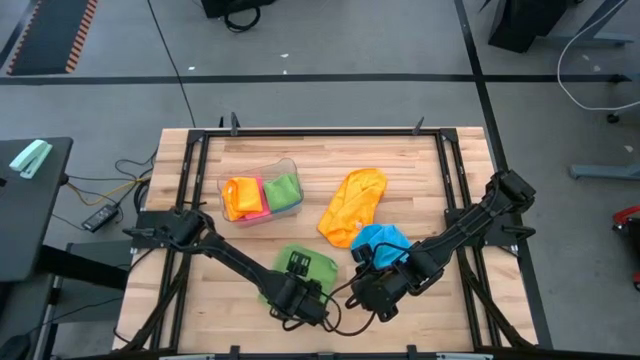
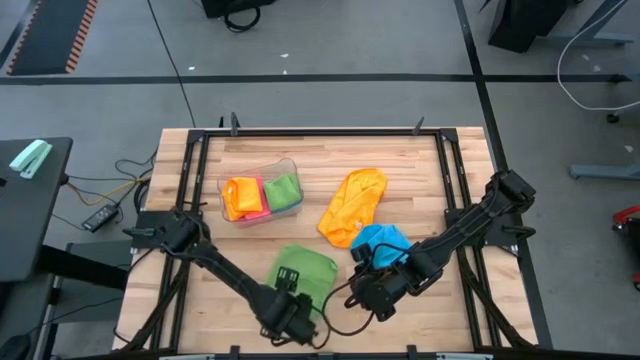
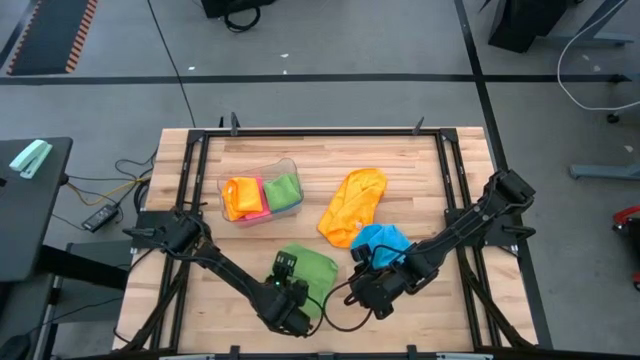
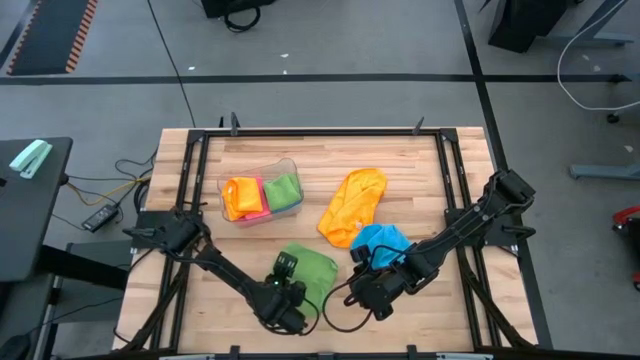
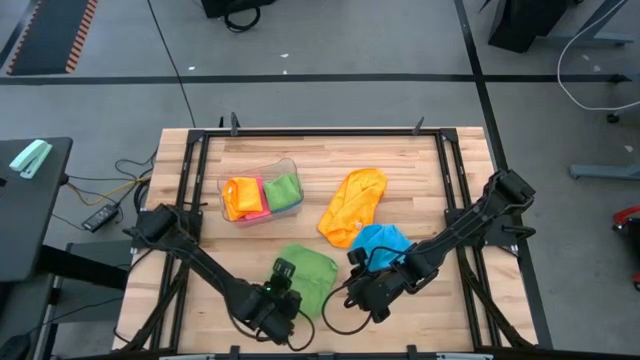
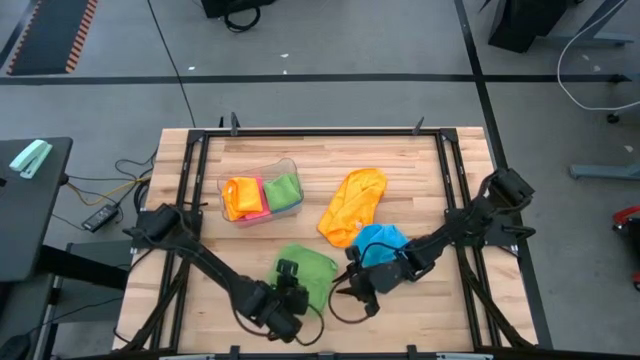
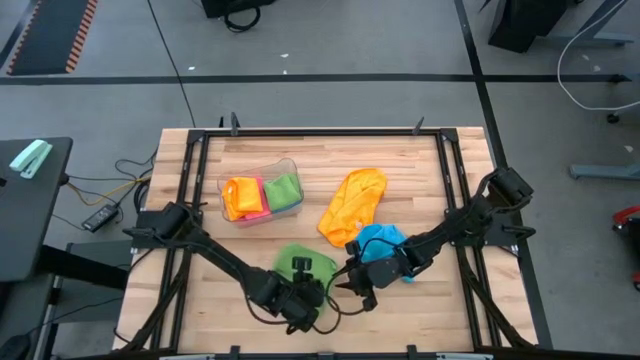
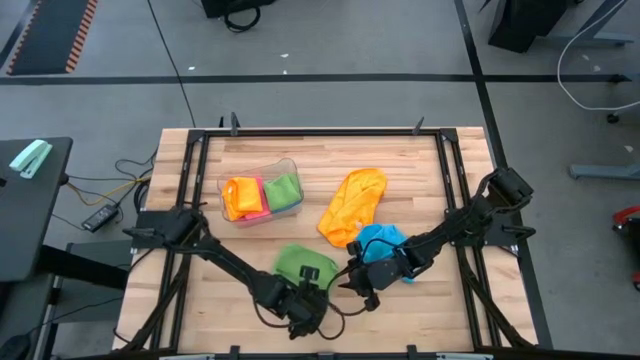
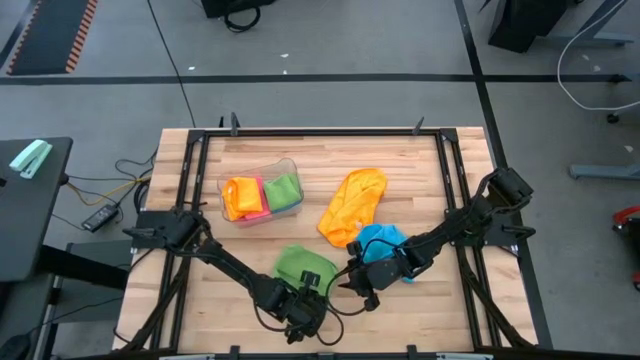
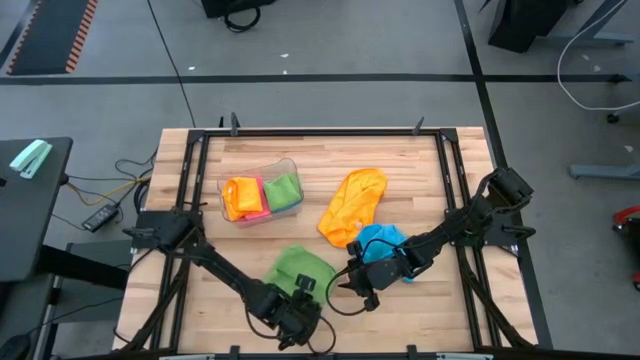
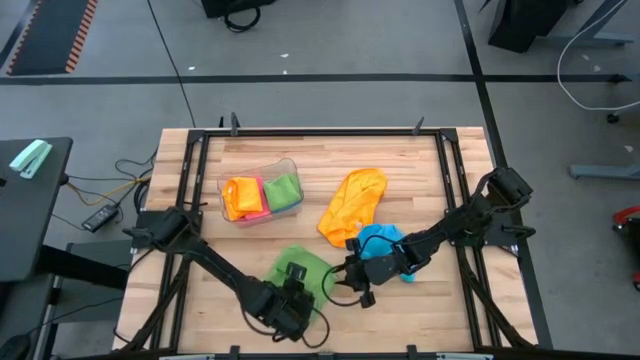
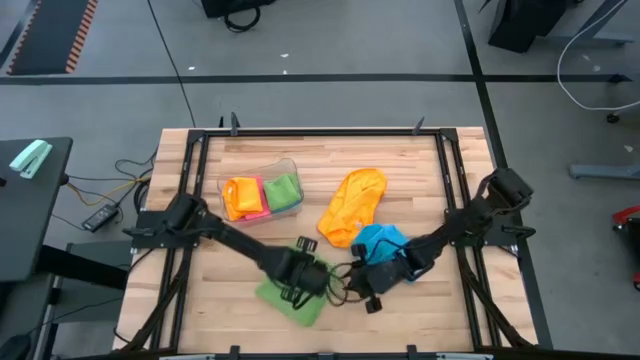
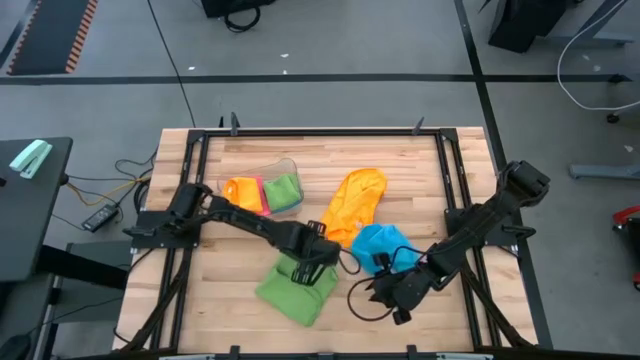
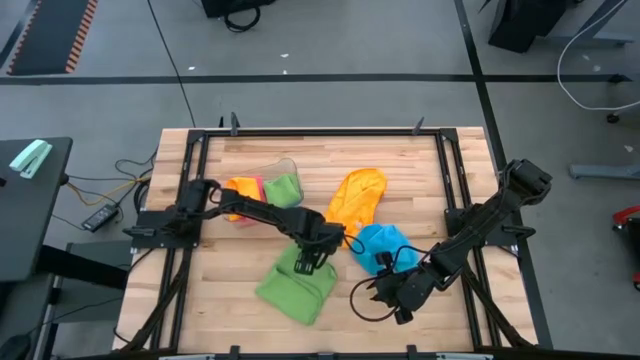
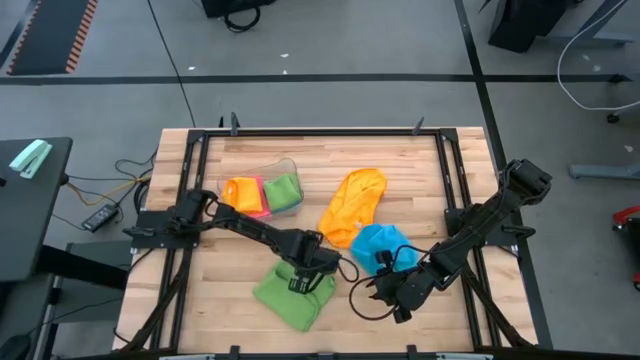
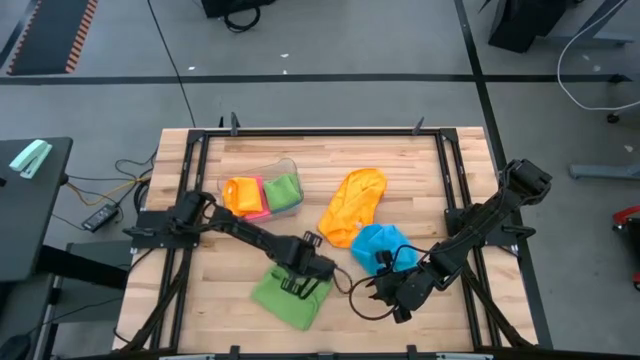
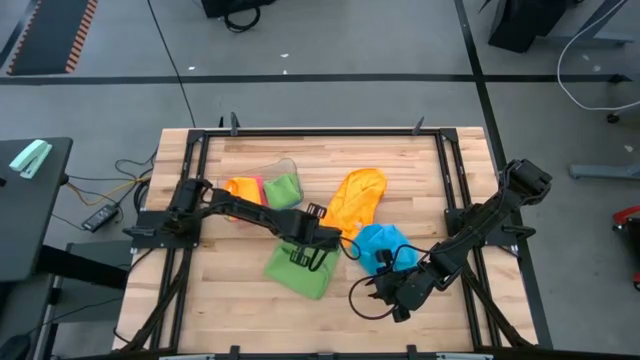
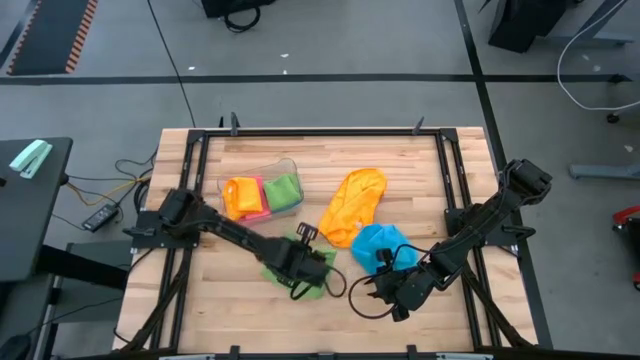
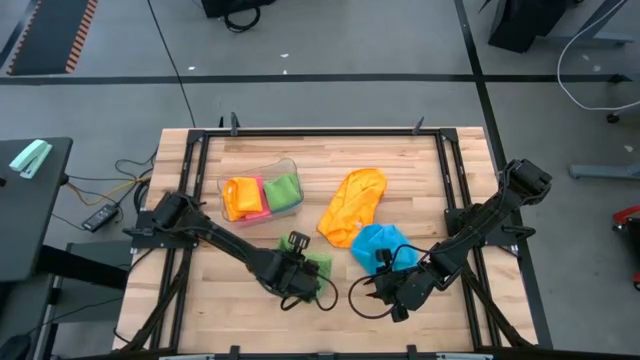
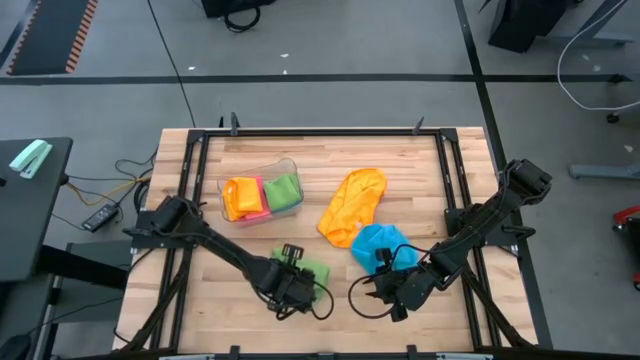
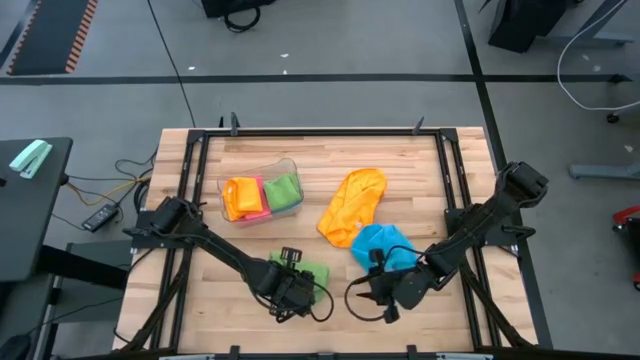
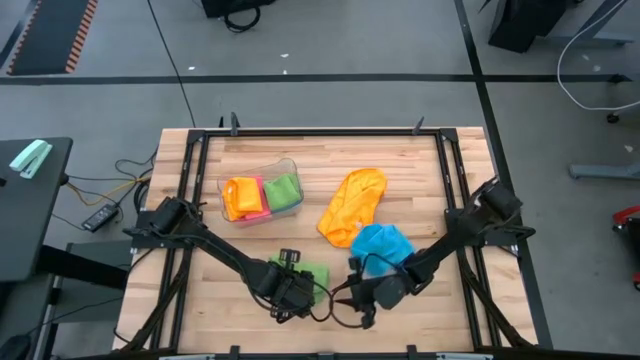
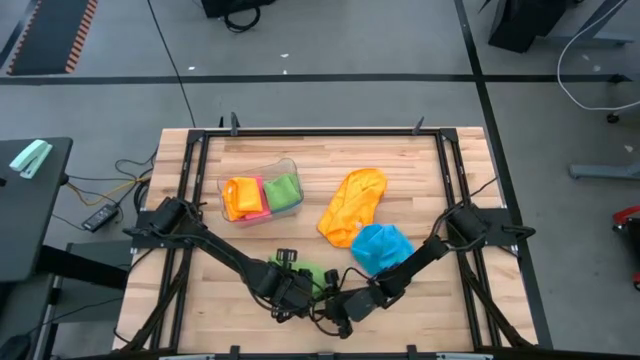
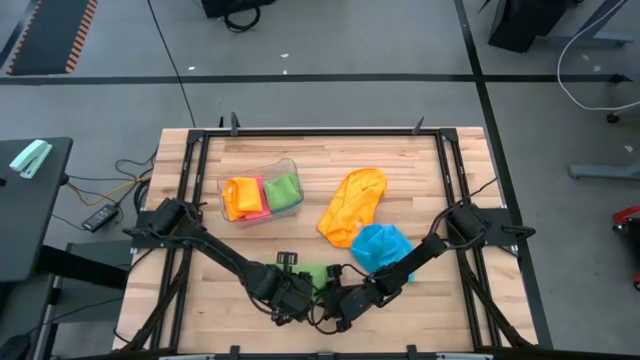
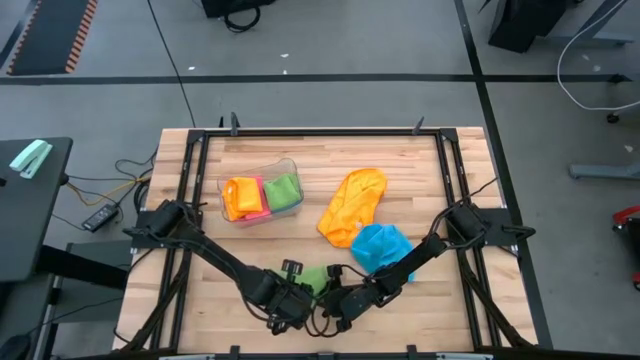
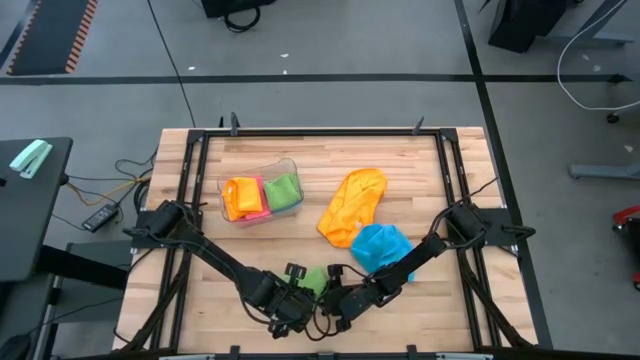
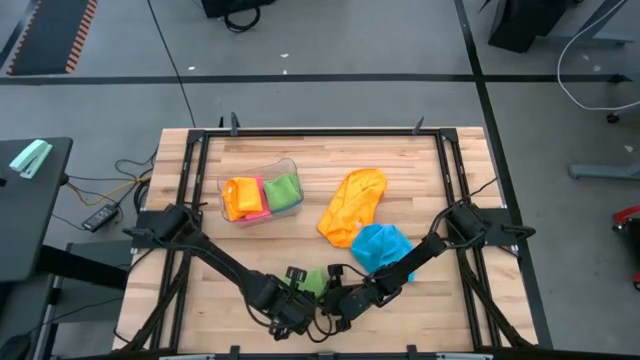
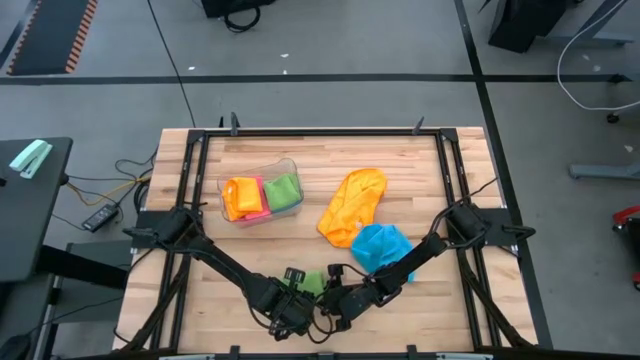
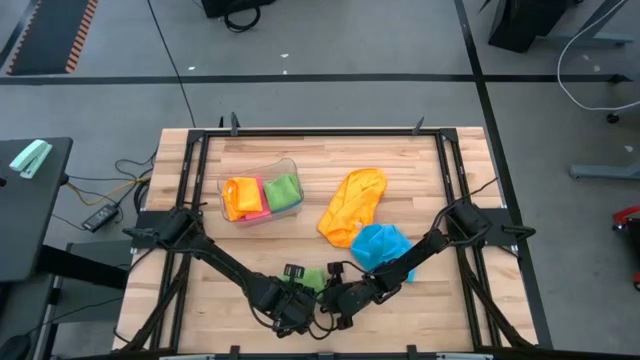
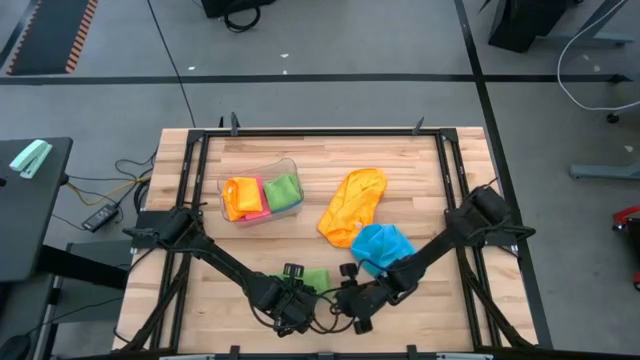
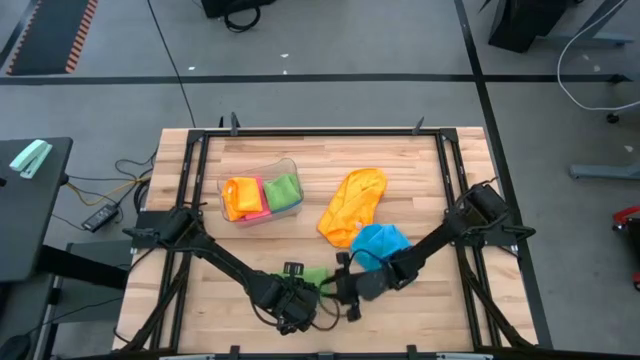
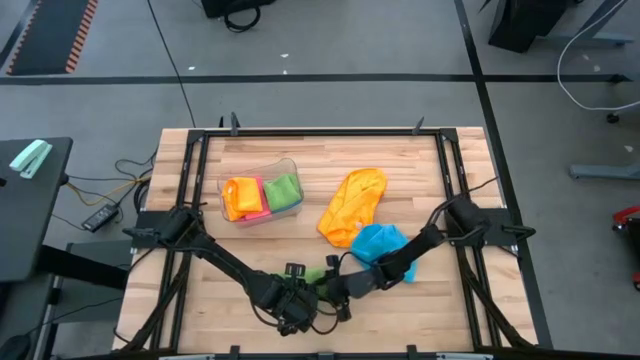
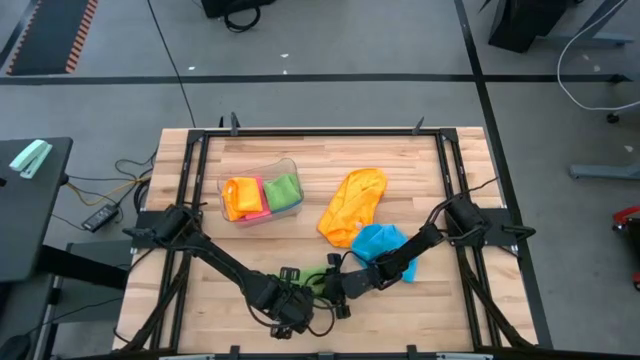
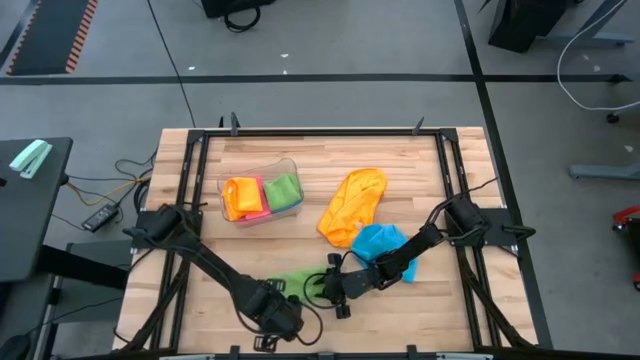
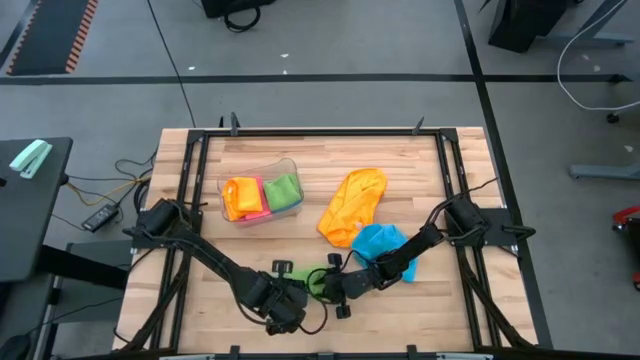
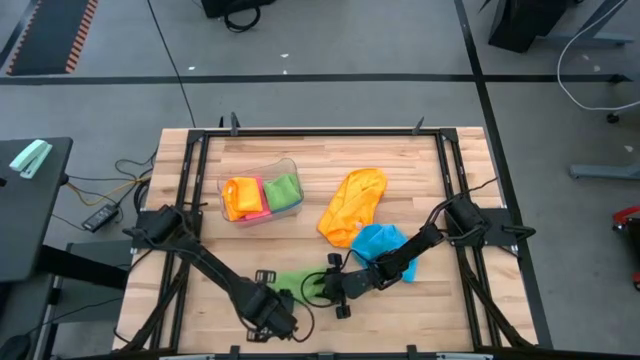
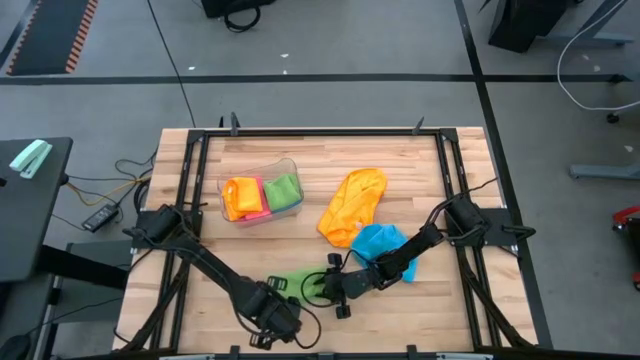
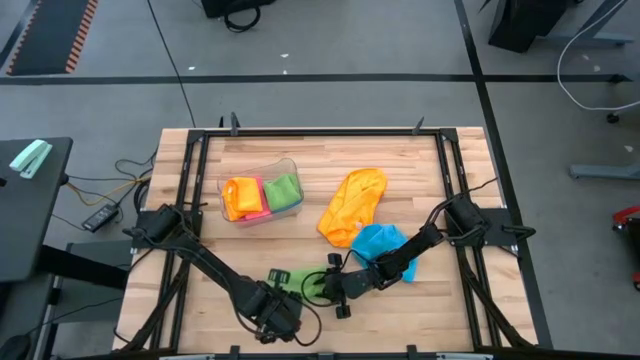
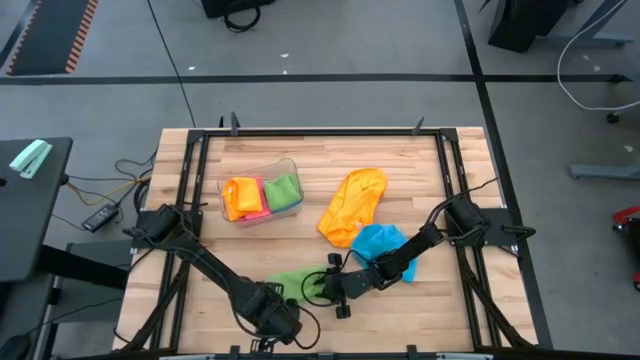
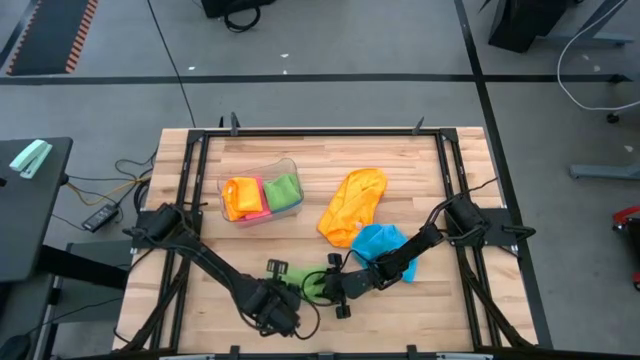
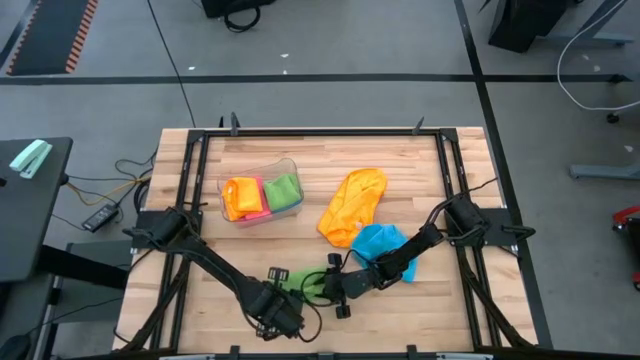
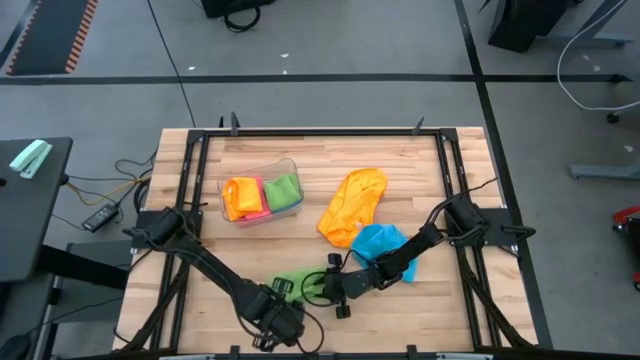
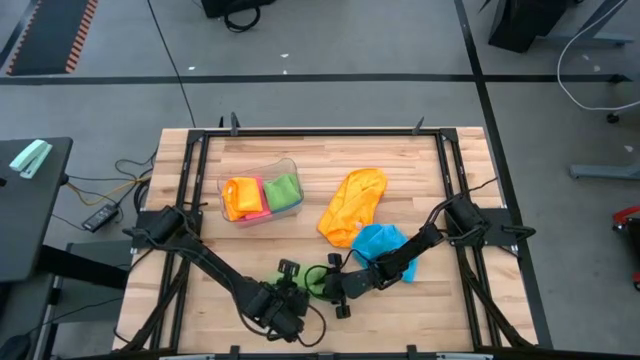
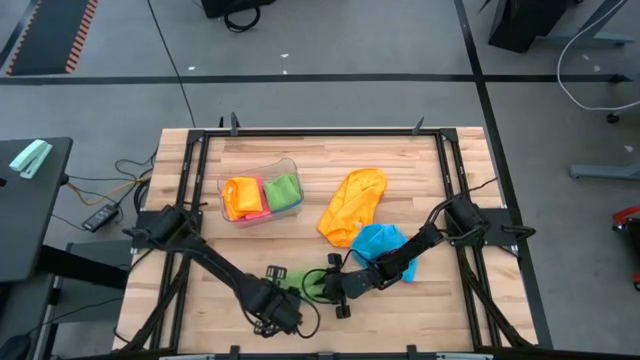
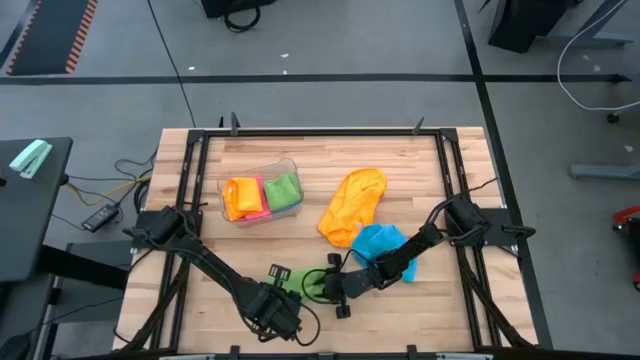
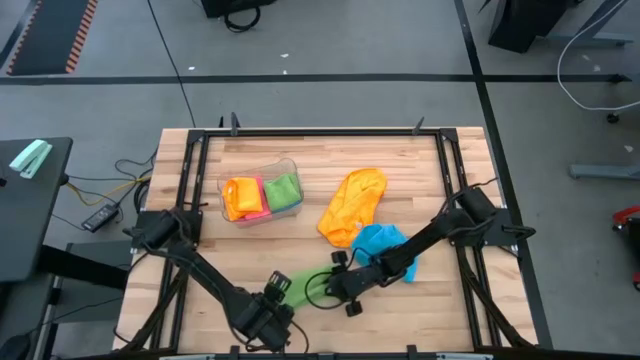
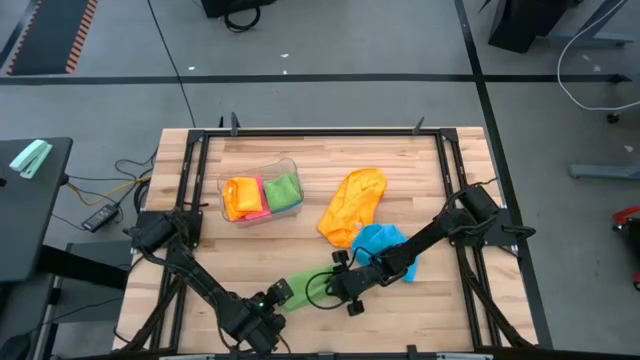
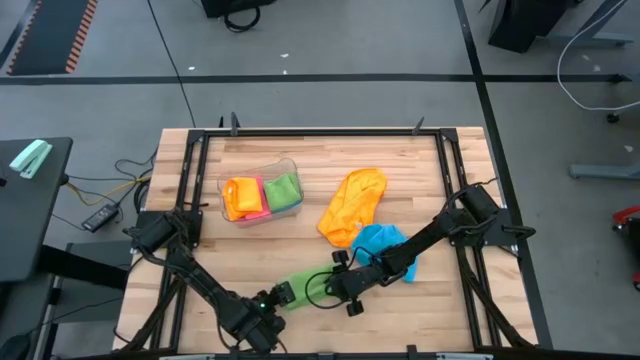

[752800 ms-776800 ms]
Task: Fold microfiber towels
Fold the green microfiber towel
